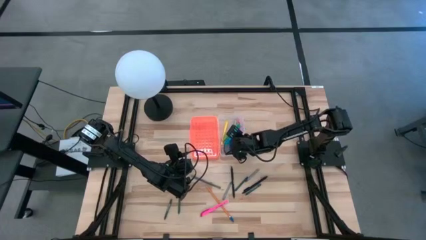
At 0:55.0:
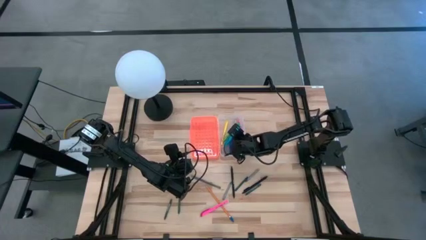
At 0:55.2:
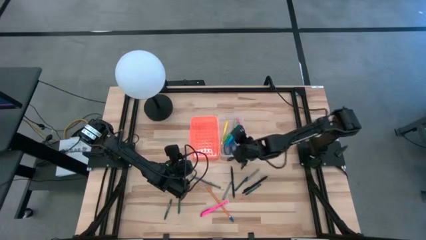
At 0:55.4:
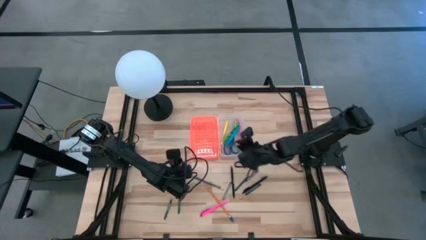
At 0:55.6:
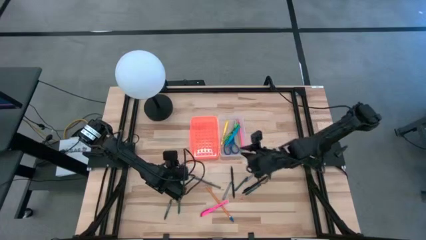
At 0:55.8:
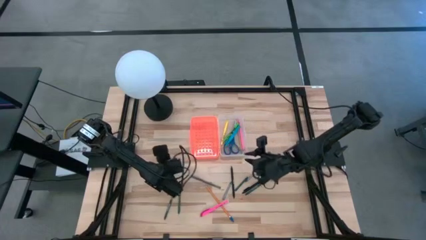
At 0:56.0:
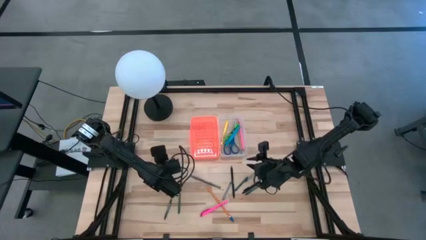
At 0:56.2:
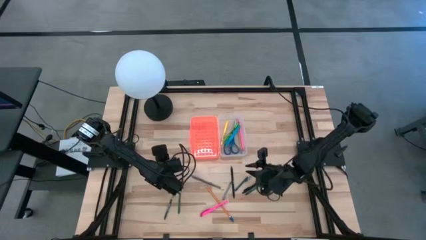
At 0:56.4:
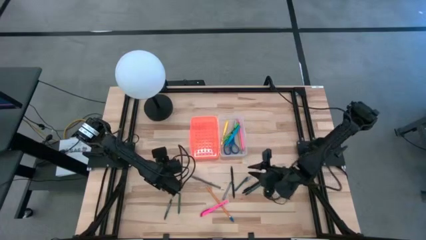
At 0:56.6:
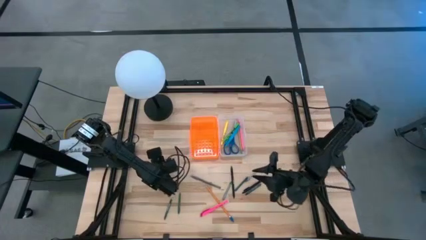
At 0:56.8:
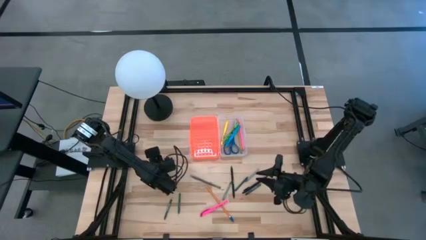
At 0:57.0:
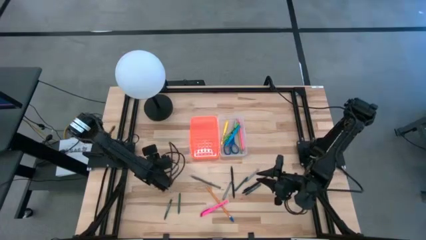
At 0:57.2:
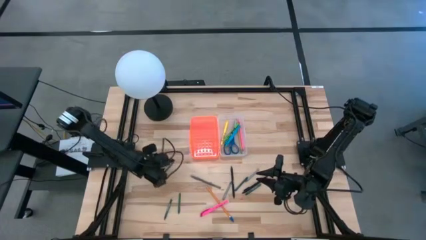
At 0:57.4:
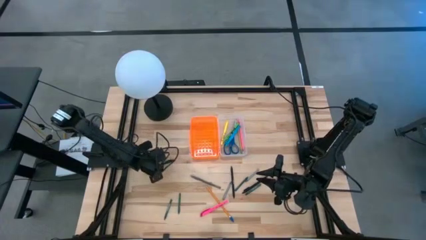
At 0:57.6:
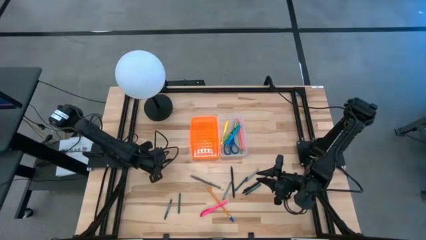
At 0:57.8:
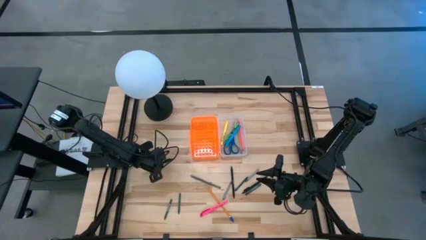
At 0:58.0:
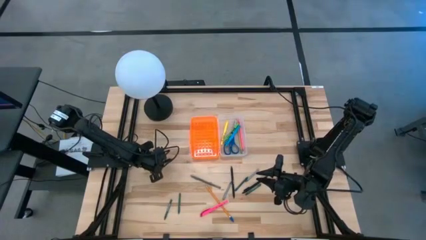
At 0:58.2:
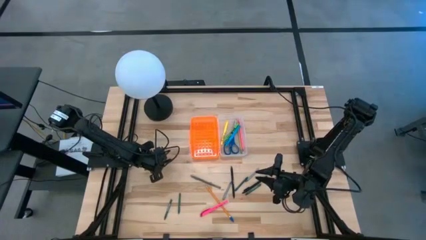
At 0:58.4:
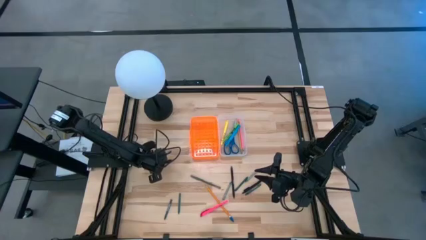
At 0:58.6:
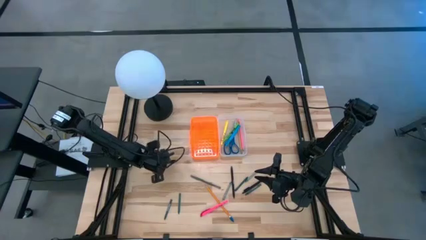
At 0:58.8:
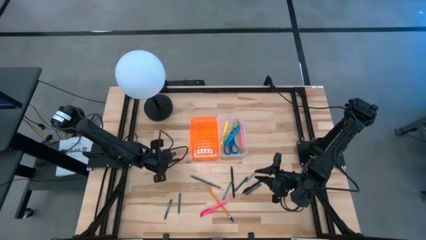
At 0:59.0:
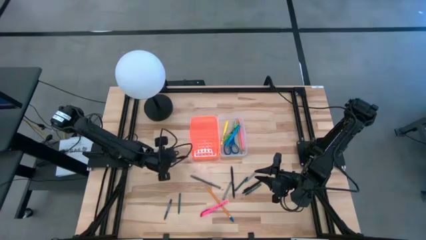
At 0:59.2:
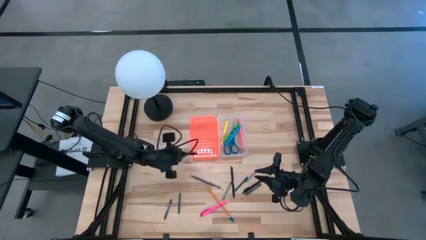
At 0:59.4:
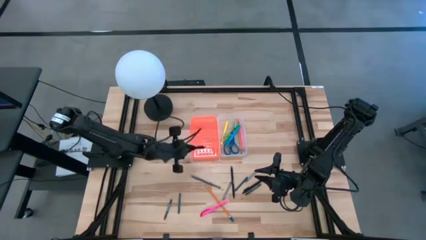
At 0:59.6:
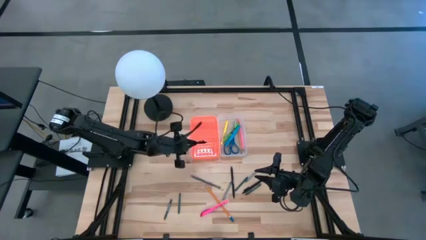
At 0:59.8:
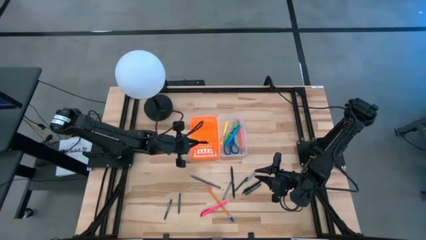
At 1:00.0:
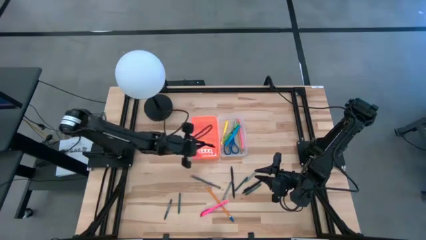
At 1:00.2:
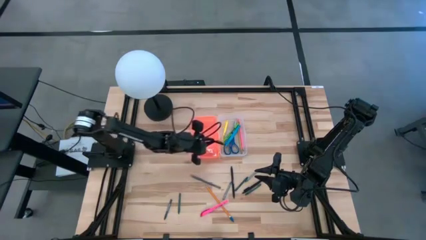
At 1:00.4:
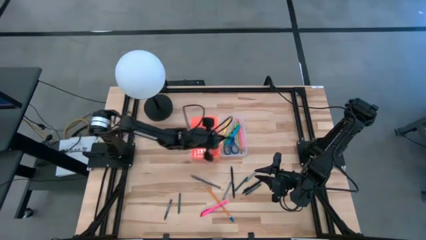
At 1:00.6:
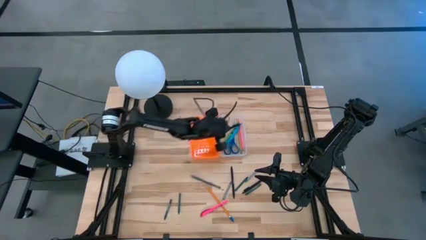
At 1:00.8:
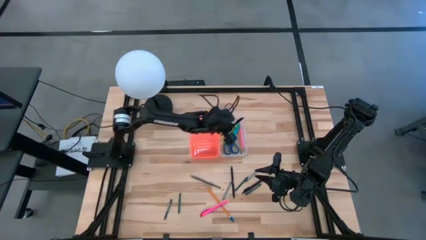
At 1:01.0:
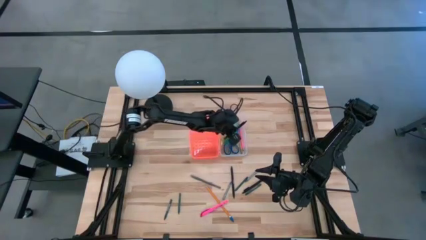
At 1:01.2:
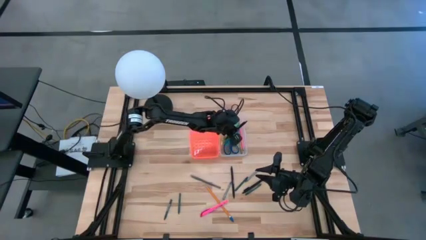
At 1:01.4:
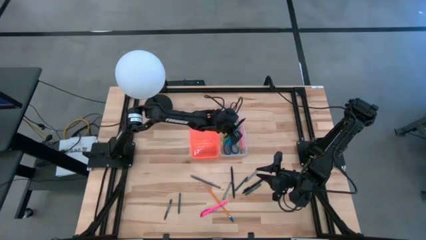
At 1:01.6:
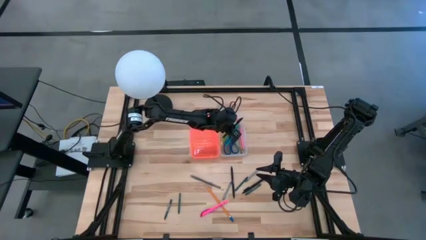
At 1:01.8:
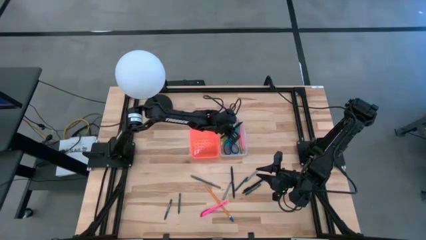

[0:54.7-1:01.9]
Task: Pick & place school supplies into a supply box
Put the black pen into the orange supply box

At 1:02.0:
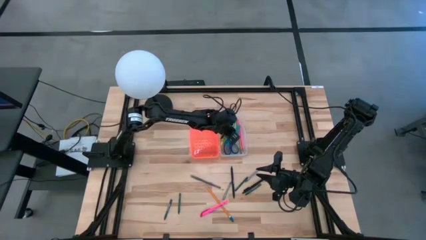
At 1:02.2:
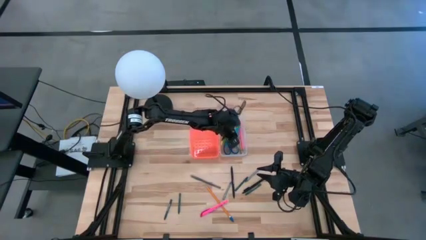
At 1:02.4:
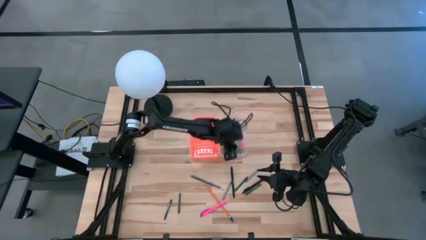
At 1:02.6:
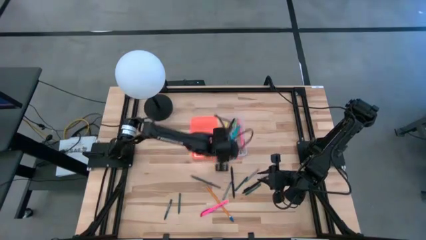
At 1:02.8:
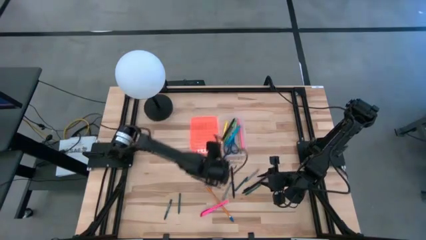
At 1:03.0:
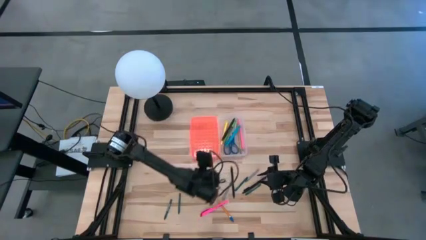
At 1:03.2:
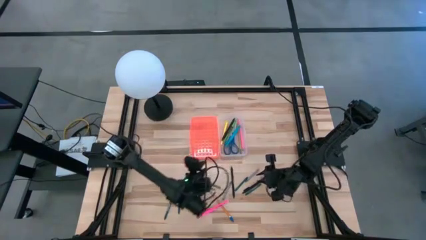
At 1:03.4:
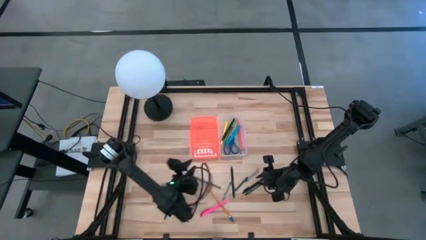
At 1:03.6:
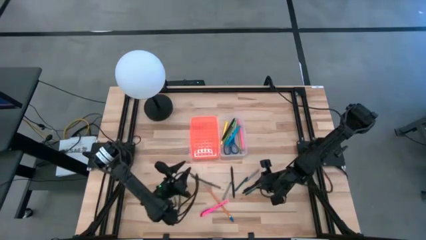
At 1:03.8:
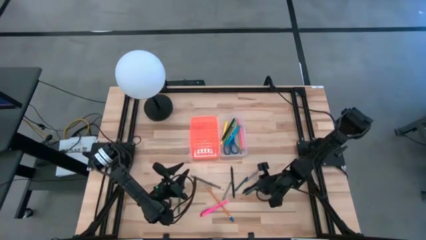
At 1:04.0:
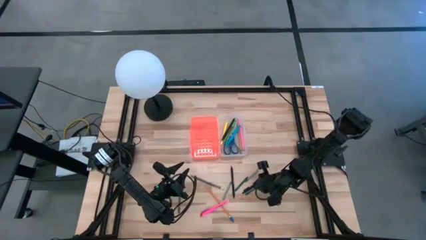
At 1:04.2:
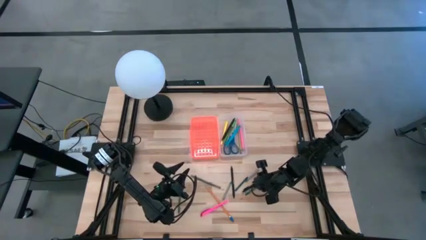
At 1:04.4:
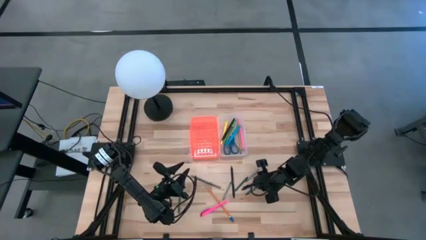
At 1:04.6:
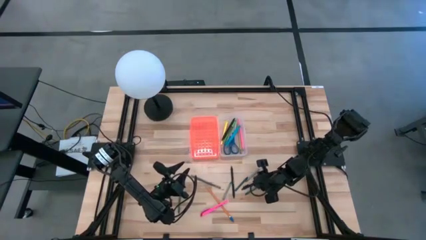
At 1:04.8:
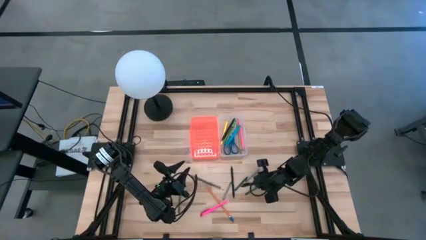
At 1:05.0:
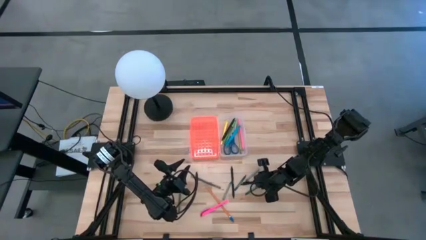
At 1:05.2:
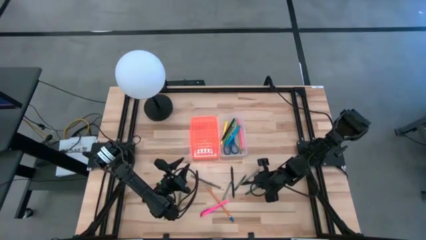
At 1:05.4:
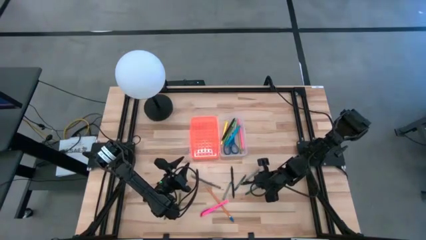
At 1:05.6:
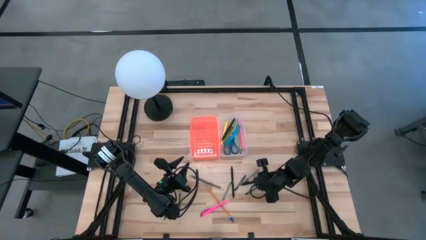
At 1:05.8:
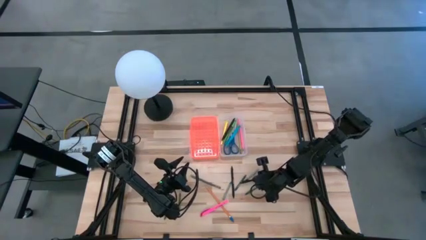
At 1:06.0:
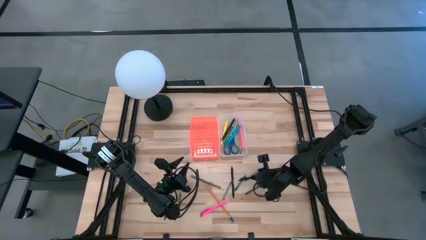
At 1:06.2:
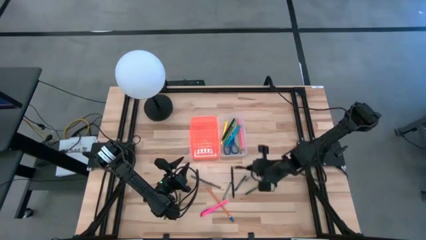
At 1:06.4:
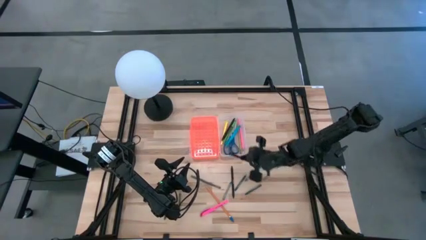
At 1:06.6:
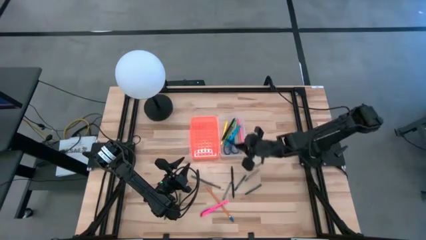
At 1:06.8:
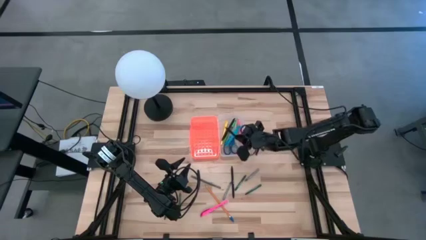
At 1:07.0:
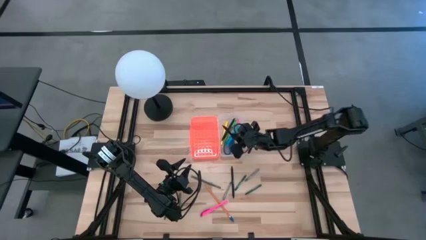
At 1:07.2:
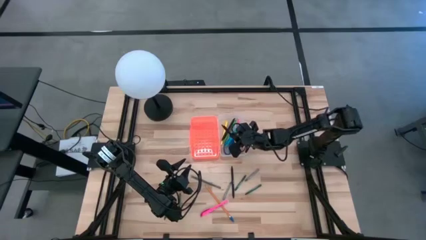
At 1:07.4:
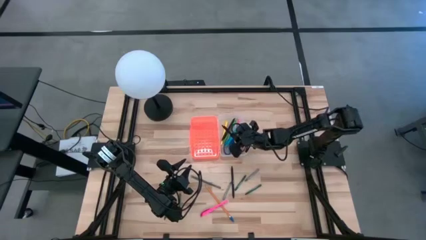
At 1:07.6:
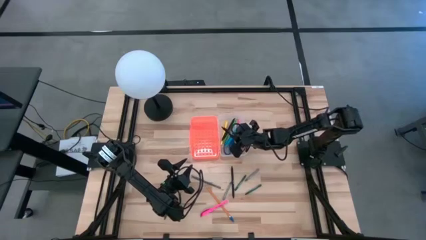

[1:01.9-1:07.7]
Put the black pen into the orange supply box

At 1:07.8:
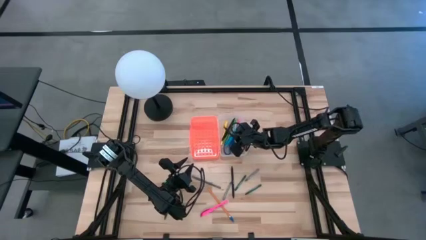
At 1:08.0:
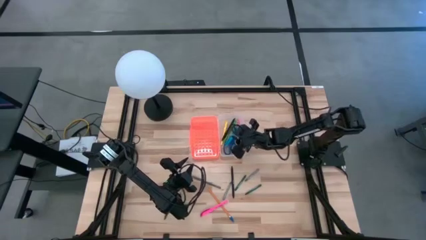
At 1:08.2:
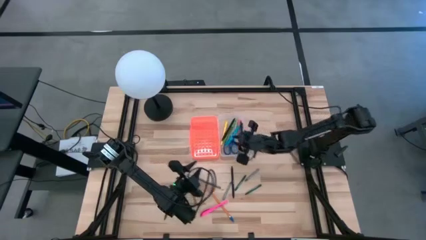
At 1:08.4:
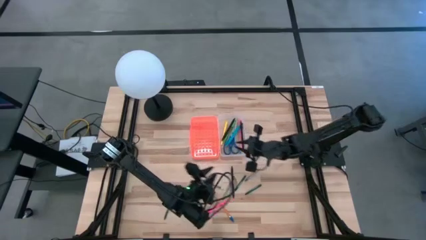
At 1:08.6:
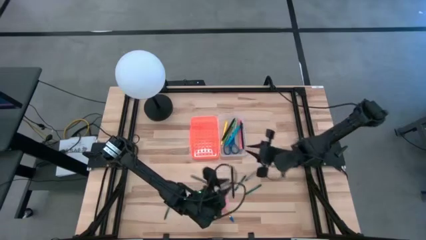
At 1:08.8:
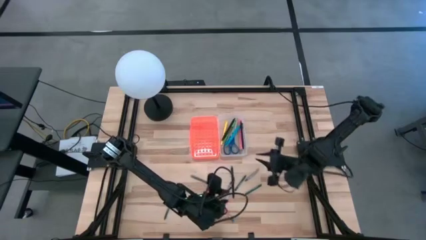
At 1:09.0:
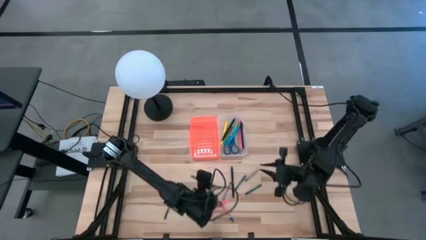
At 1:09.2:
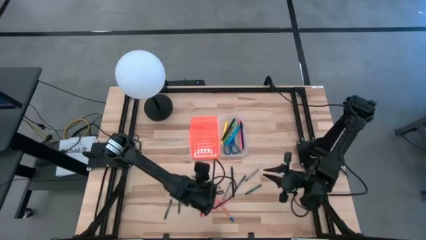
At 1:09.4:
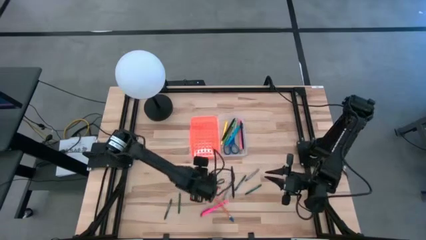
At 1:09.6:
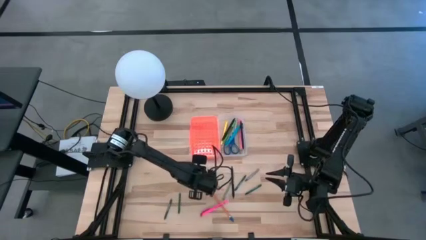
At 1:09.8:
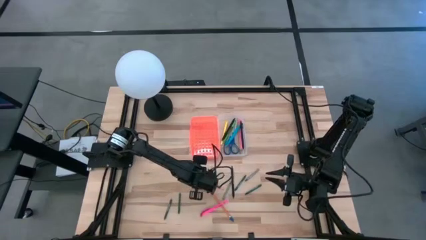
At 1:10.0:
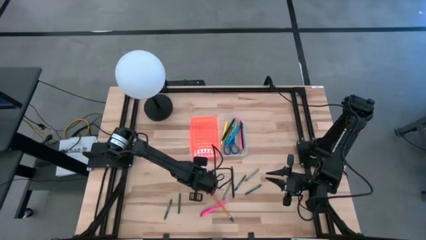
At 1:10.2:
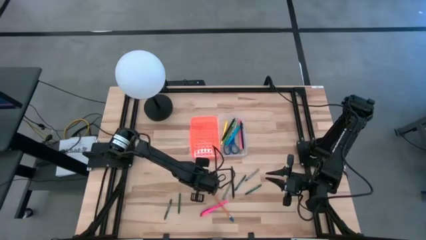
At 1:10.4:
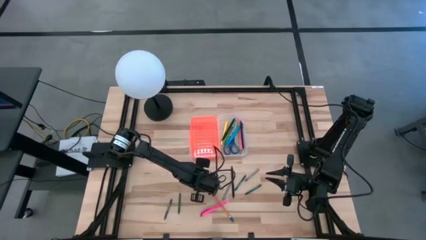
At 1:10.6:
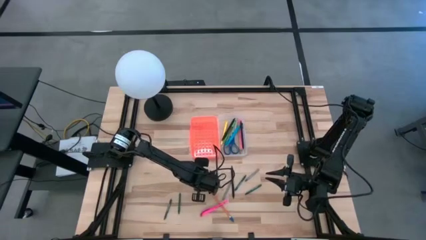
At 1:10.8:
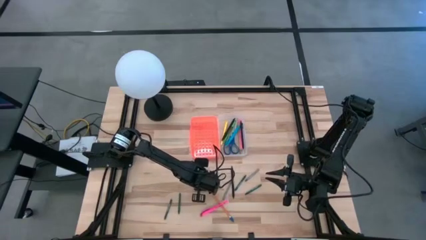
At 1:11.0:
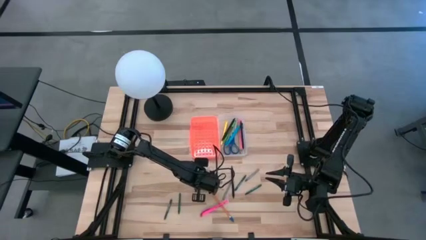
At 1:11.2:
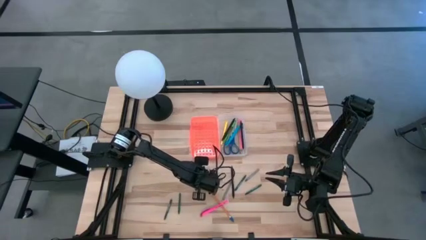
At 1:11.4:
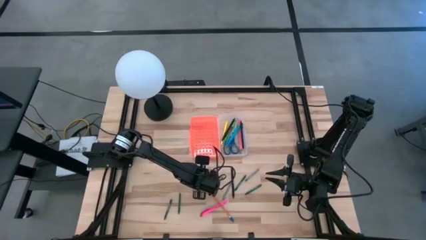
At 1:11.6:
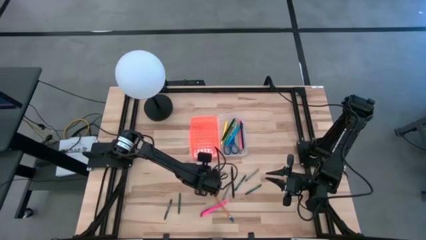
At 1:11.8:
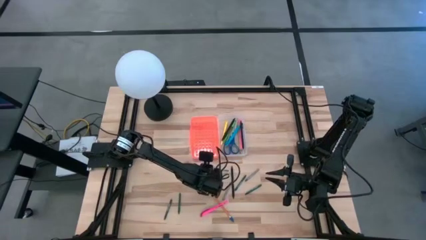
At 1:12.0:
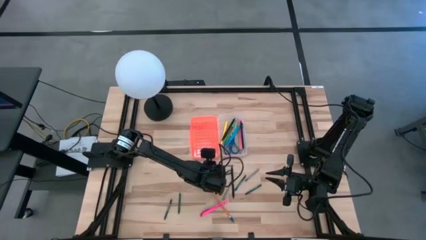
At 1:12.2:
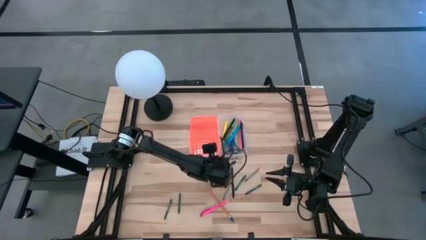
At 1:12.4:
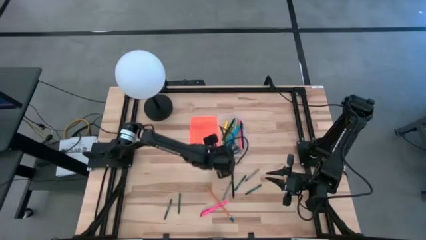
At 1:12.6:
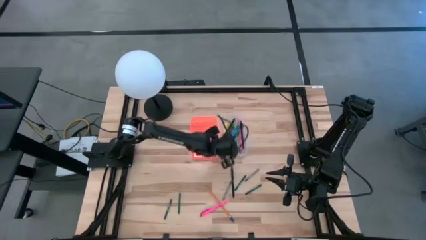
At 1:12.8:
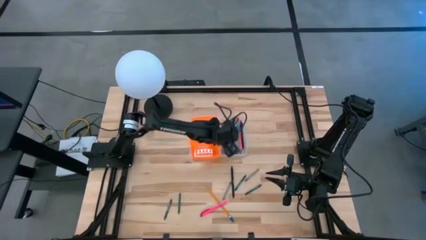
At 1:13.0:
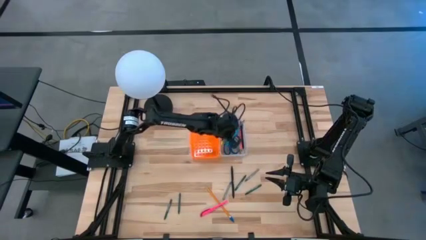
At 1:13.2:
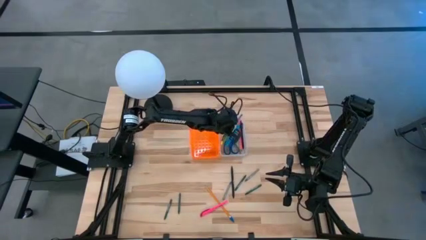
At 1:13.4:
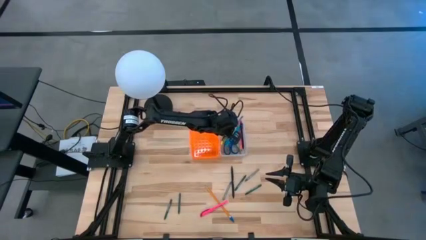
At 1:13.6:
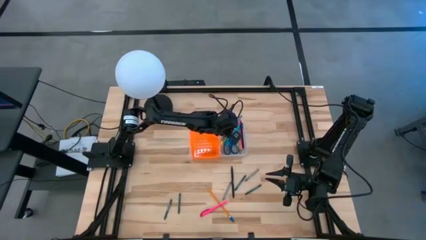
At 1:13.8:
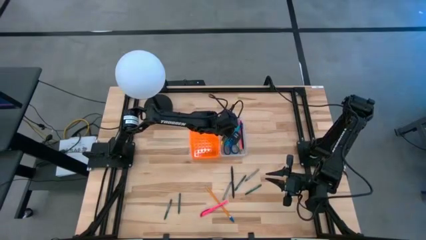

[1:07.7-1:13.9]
Put the gray pen into the orange supply box
